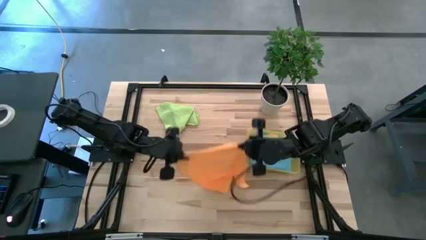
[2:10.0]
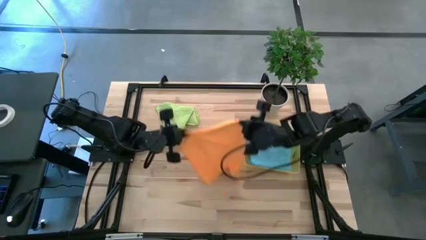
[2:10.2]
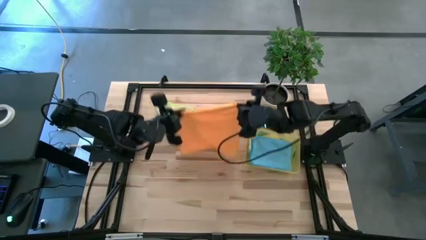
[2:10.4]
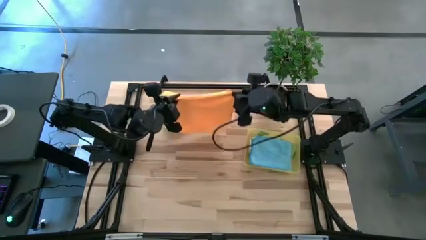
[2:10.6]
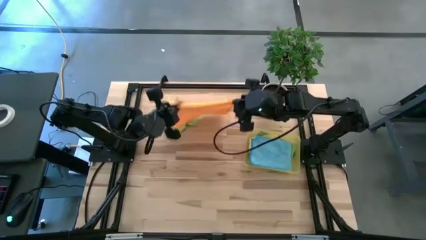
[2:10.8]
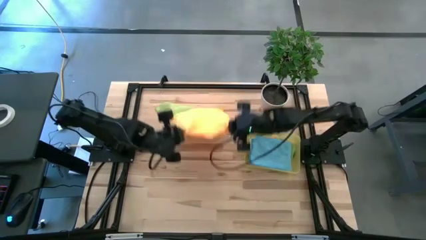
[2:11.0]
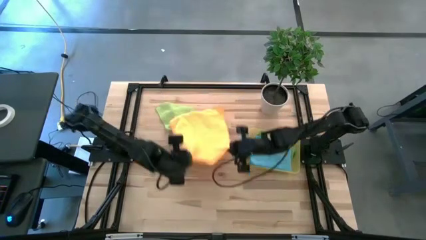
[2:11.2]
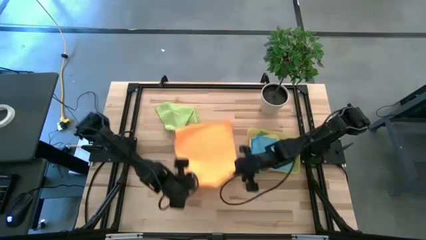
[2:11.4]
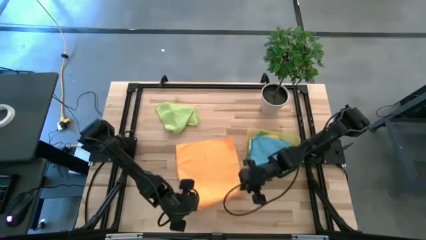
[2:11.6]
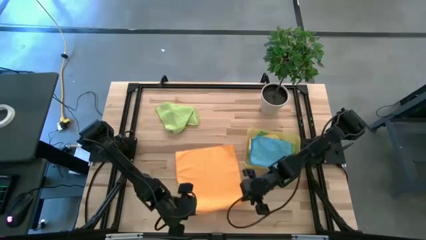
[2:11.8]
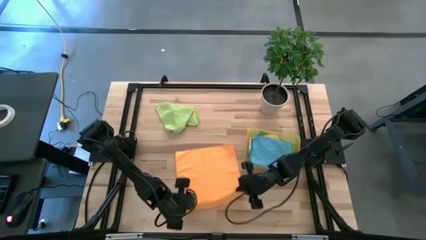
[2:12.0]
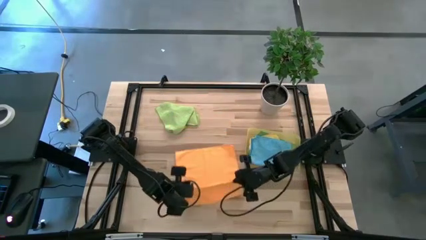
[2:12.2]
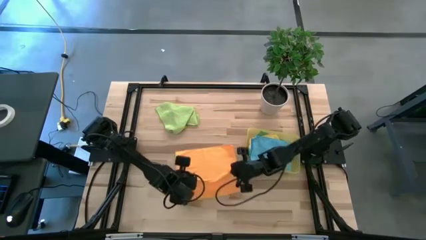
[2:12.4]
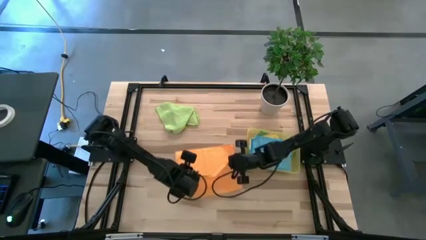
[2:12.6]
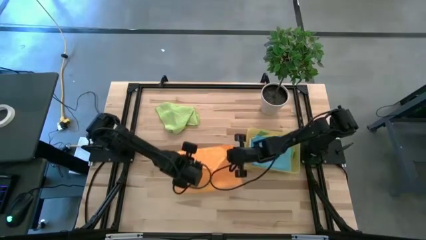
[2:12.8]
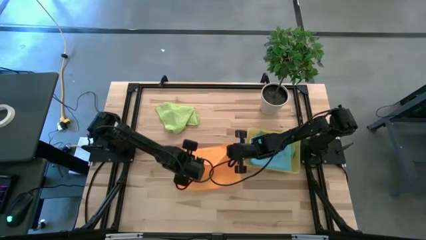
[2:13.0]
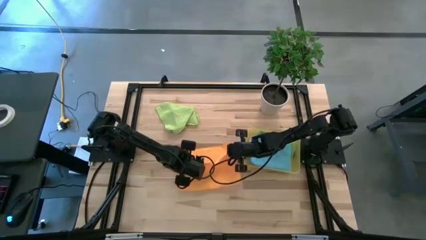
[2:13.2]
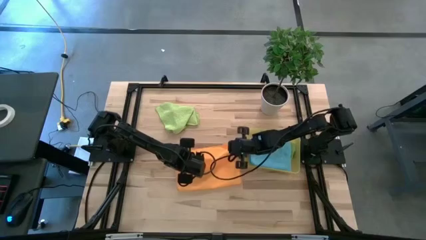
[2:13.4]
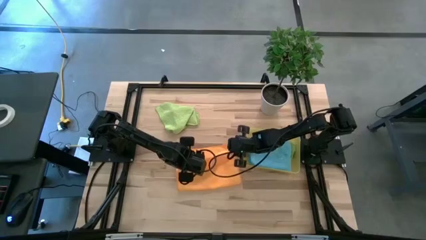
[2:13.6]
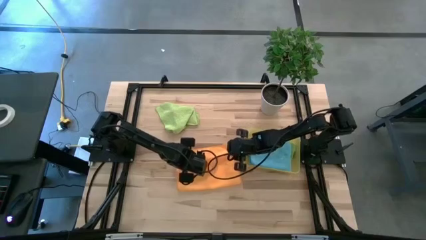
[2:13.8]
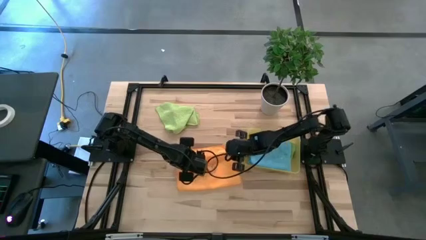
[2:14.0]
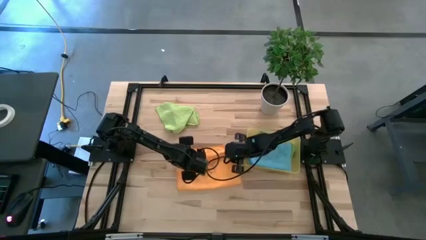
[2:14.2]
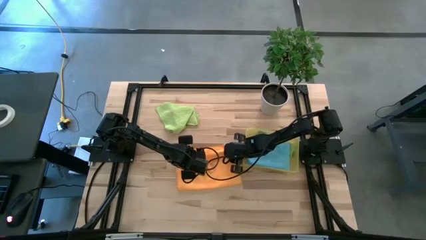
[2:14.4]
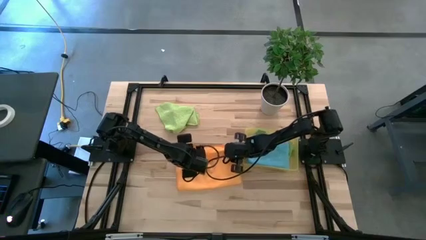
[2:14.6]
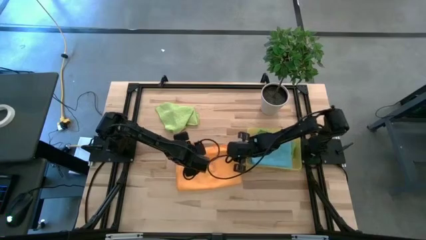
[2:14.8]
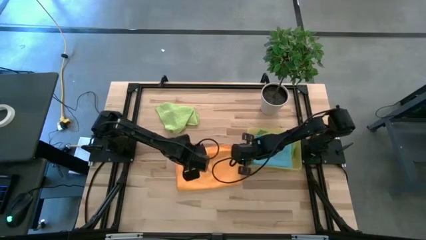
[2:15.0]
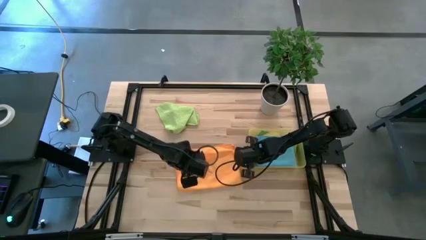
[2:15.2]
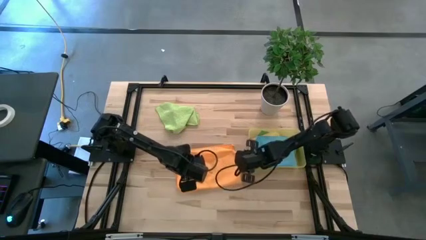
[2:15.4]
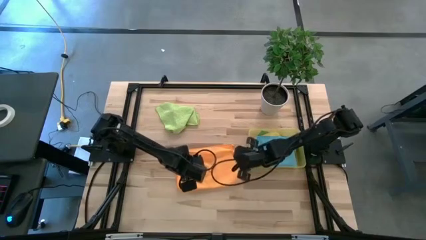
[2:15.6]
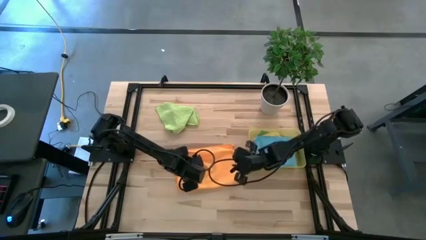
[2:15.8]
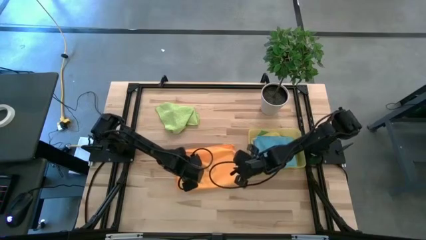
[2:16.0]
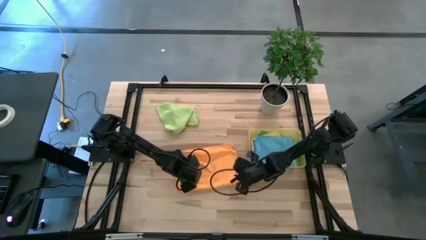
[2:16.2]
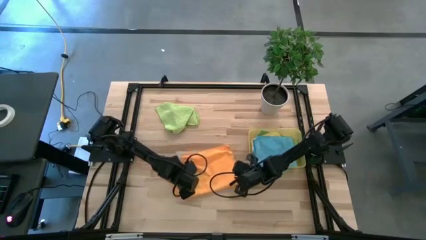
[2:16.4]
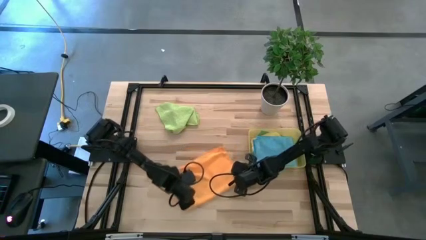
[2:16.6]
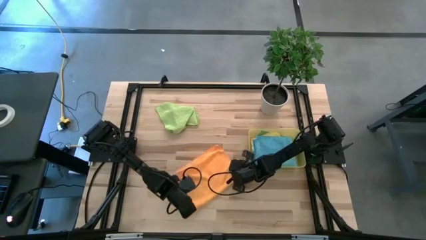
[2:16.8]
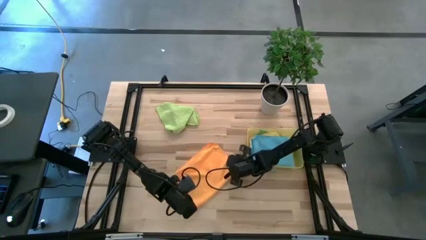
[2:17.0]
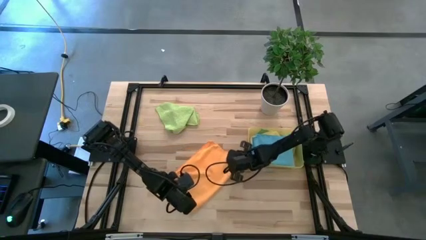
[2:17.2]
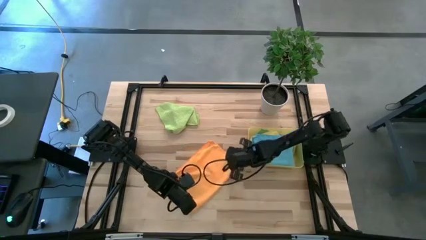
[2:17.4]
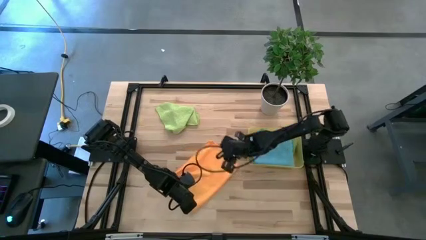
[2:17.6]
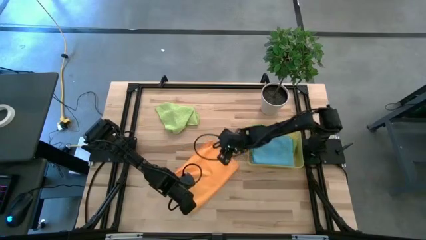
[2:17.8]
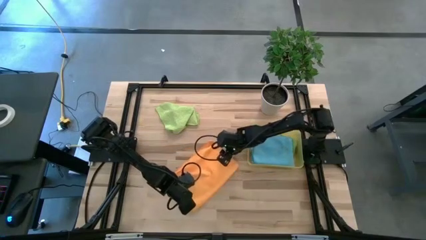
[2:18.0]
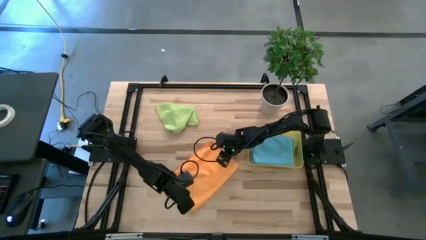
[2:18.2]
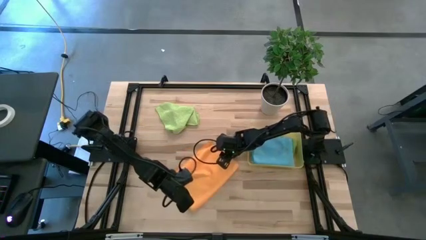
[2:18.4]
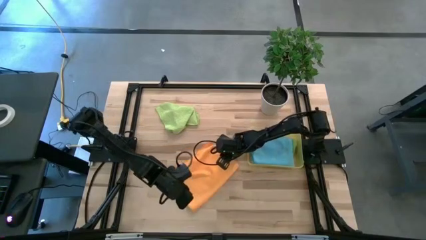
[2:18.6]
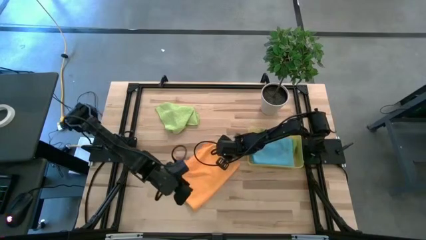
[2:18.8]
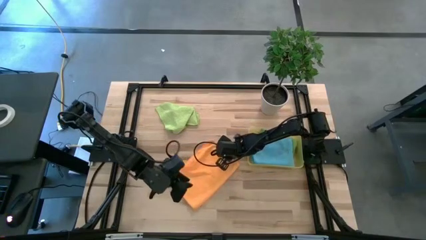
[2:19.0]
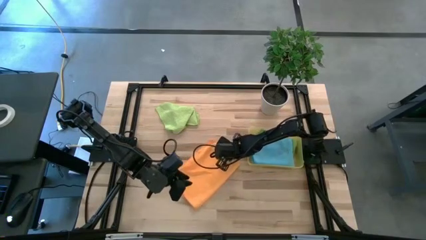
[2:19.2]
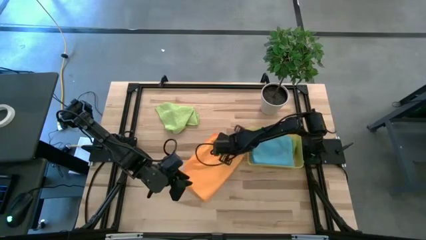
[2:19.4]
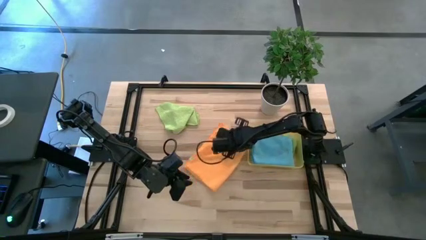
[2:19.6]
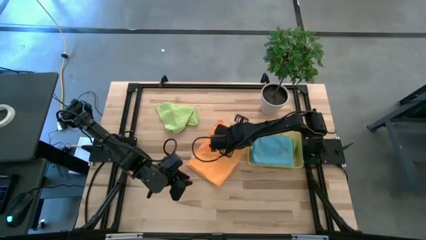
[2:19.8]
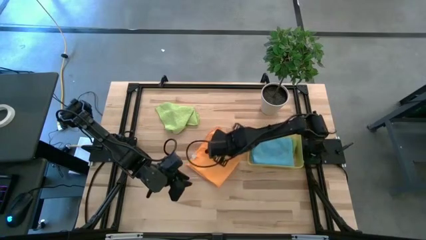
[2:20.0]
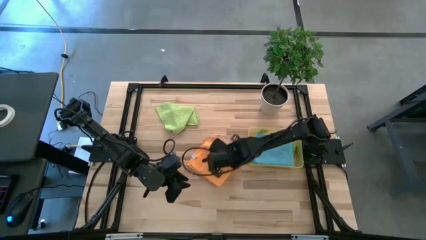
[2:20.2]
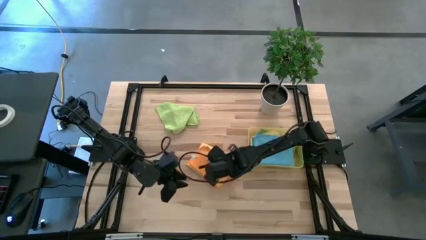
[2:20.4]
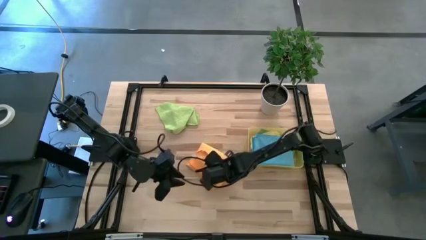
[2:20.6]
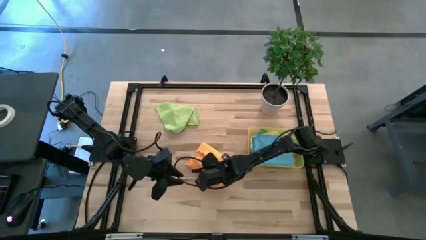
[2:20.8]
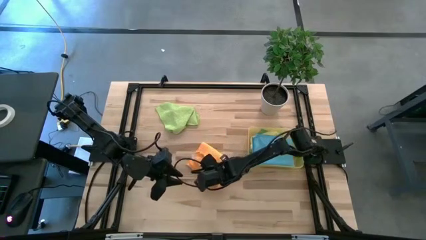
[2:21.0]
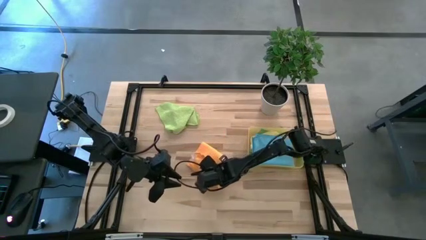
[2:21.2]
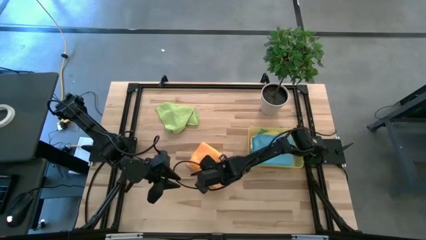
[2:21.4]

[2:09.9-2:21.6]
Task: Fold microfiber towels
Fold the orange microfiber cloth

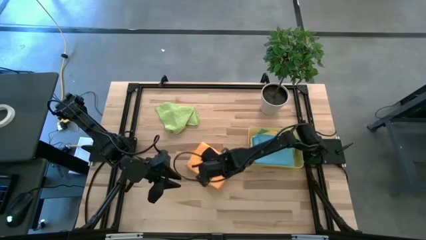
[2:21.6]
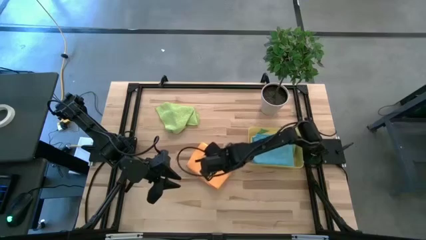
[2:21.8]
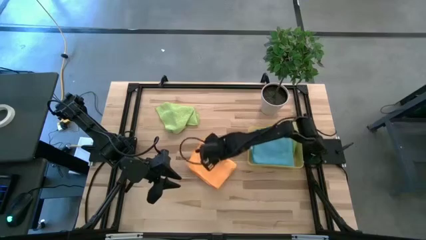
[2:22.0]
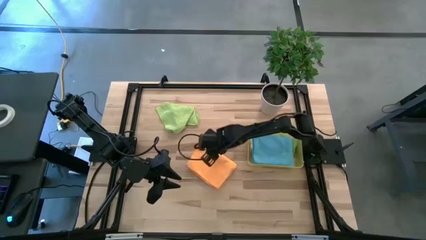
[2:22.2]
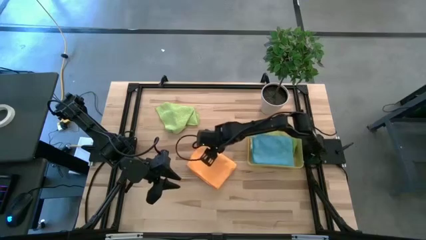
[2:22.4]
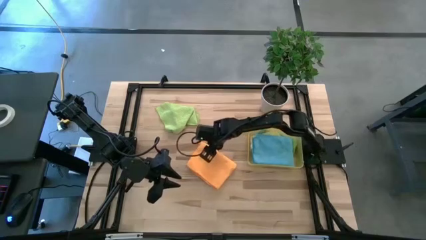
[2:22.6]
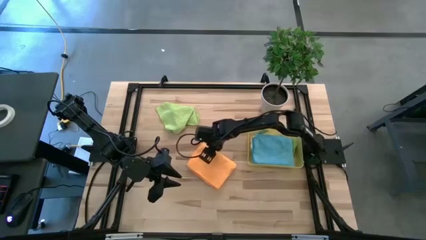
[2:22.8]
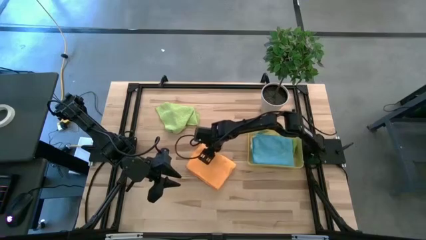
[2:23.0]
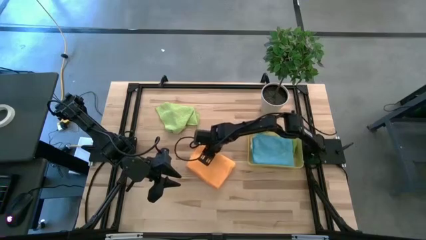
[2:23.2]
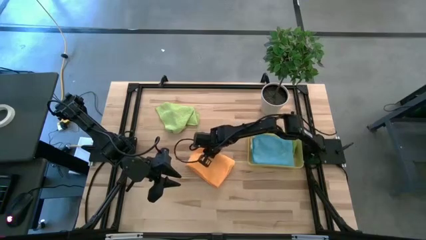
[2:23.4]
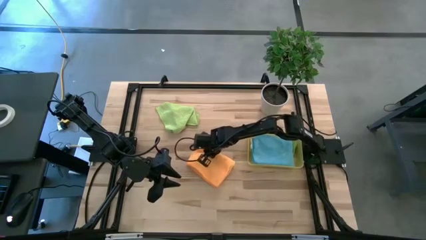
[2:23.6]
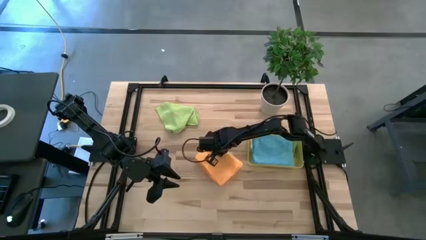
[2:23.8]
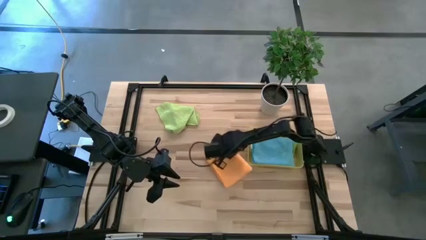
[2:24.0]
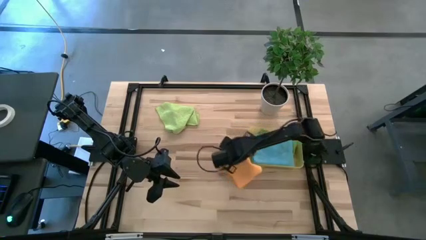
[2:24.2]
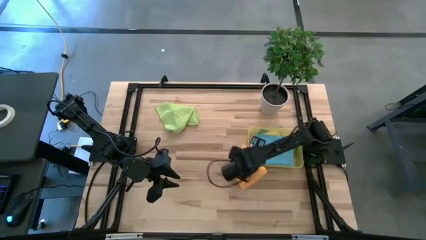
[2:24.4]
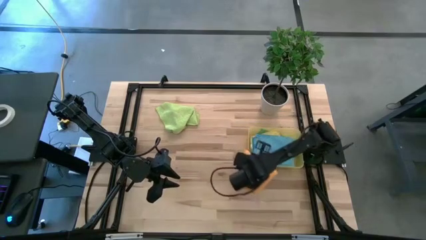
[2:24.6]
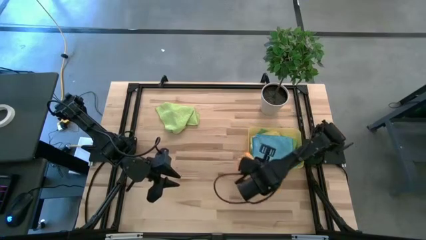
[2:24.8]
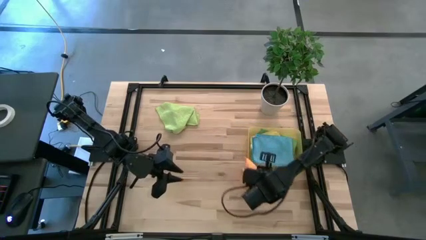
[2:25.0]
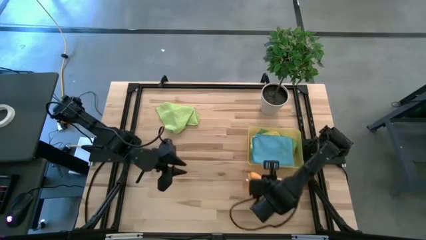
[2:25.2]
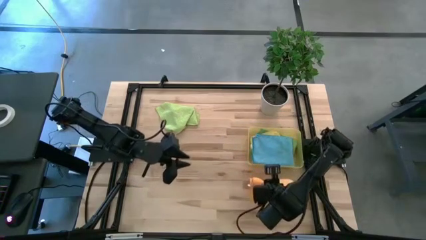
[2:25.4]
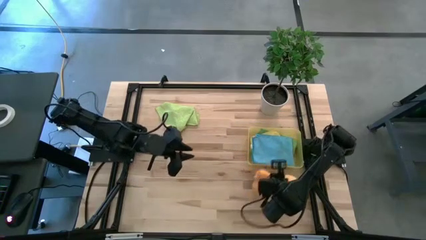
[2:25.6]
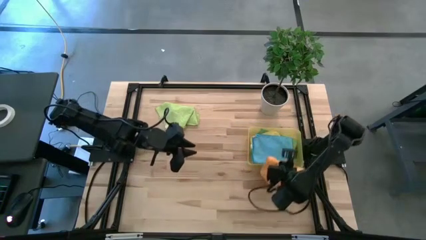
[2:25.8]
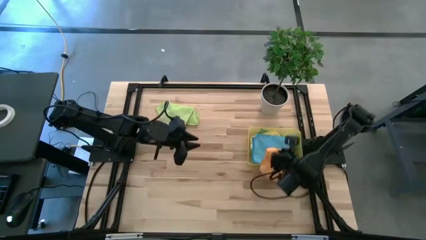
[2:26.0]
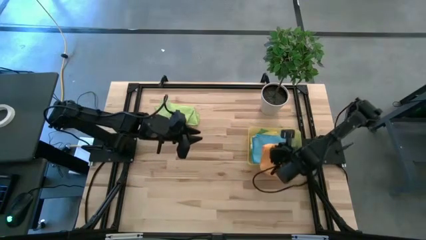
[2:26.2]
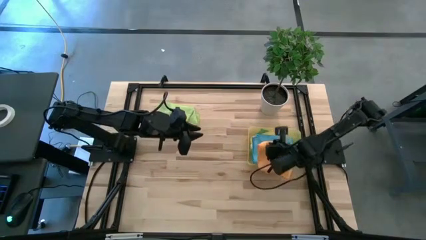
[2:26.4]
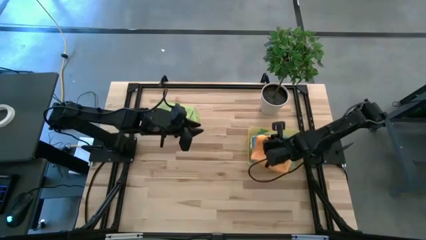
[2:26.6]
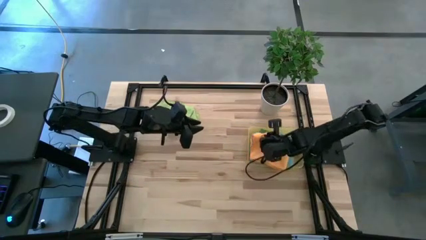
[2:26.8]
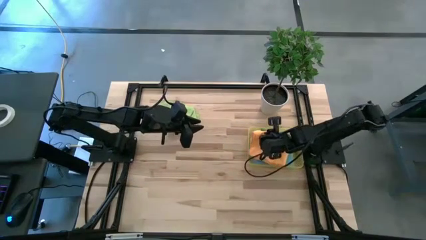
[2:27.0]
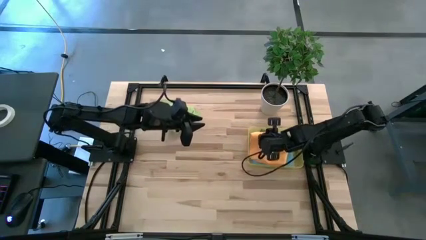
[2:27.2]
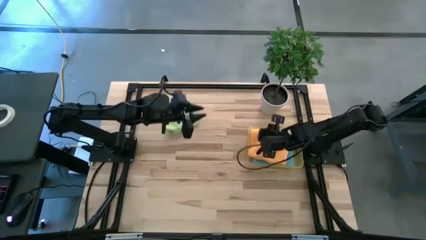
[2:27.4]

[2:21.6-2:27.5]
Put the orange microfiber cloth into the yellow bin
